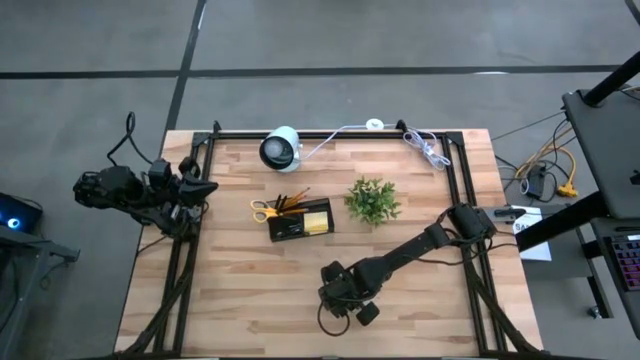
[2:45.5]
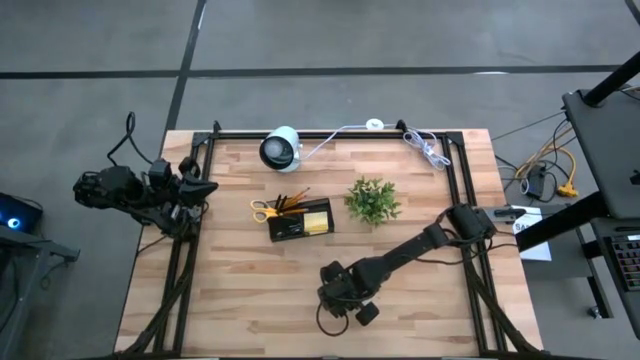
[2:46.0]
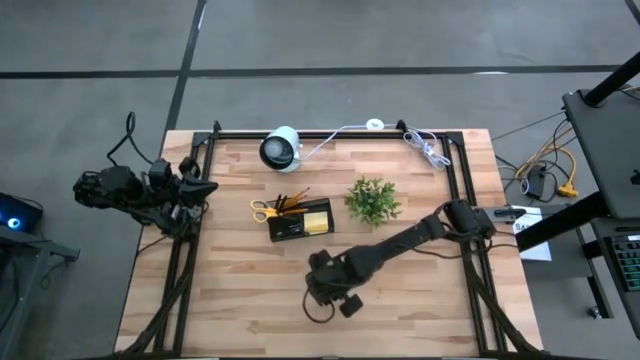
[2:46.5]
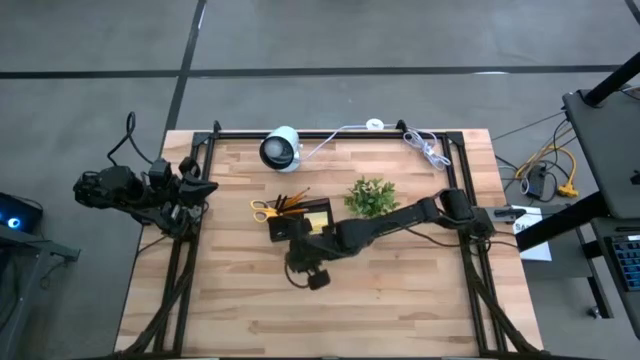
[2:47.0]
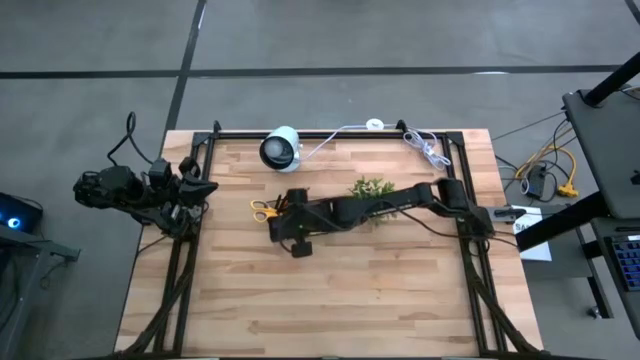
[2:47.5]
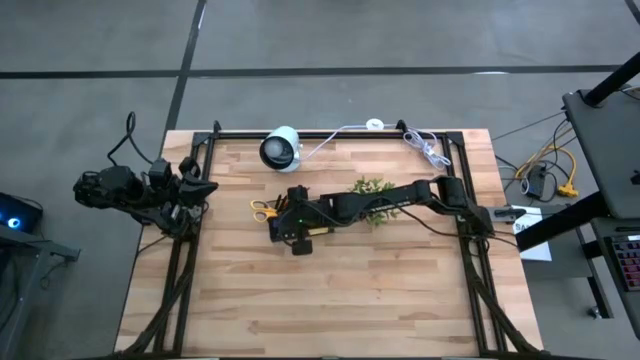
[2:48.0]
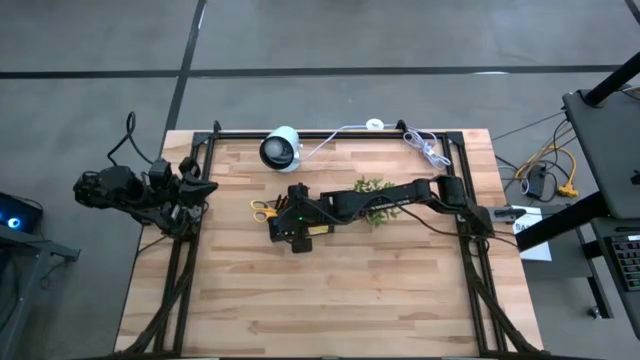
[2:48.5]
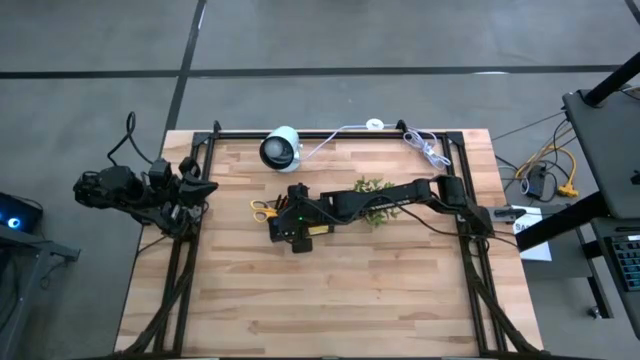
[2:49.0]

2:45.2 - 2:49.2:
Task: Pick and place office supplies into organizer
Put the blue eraser in the black desk organizer

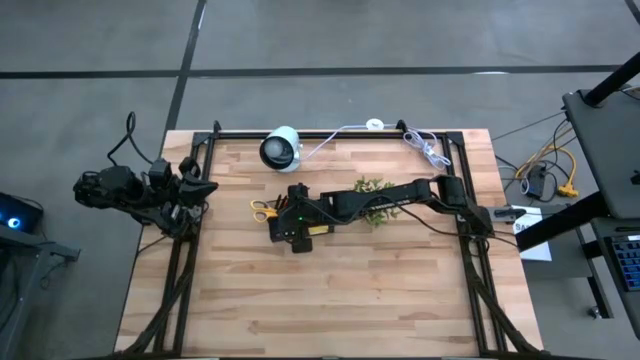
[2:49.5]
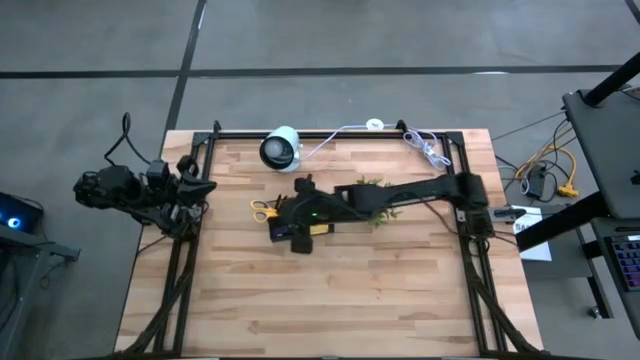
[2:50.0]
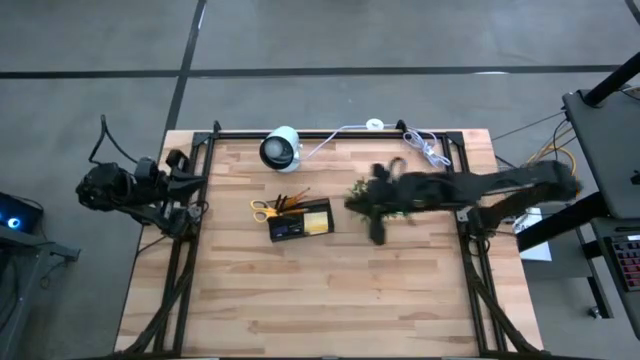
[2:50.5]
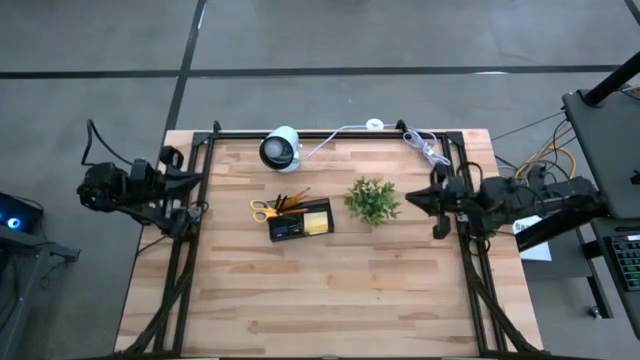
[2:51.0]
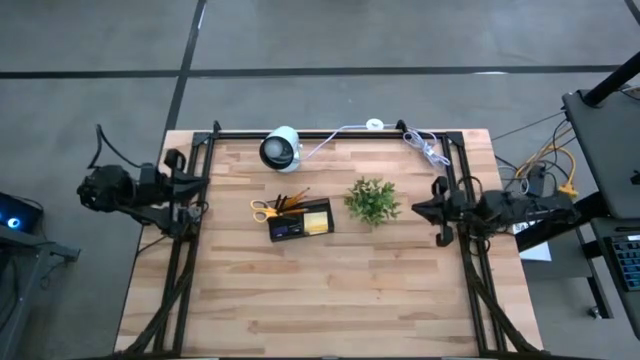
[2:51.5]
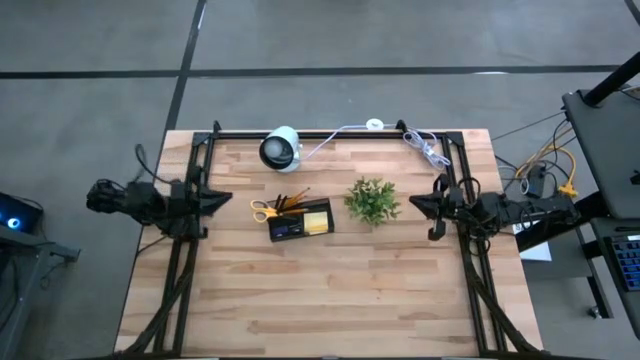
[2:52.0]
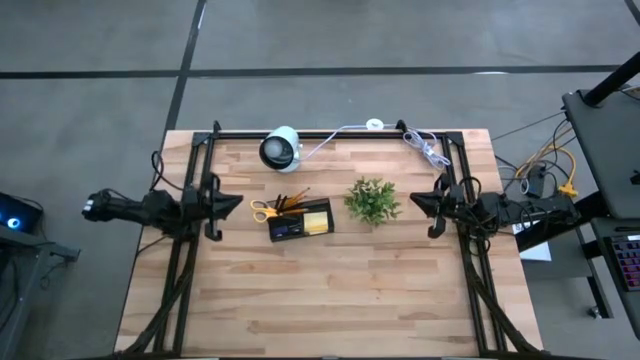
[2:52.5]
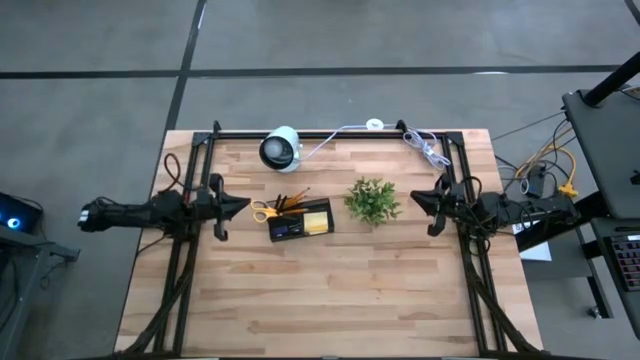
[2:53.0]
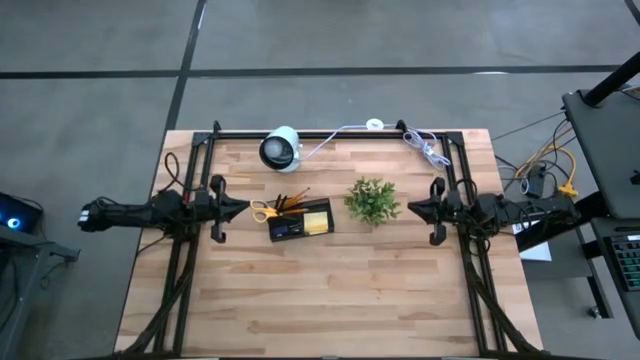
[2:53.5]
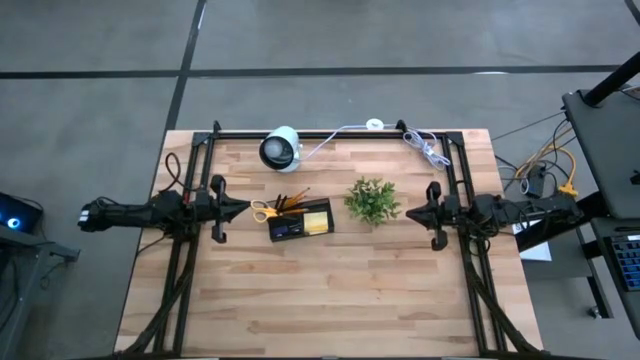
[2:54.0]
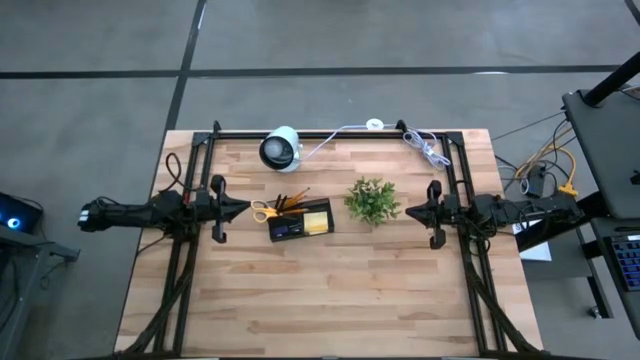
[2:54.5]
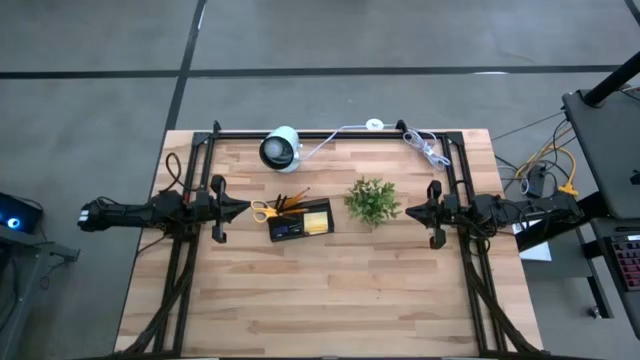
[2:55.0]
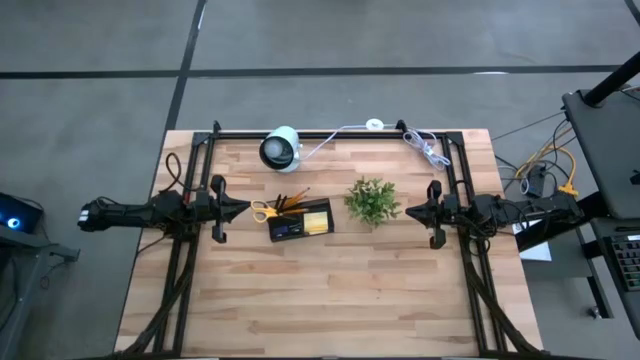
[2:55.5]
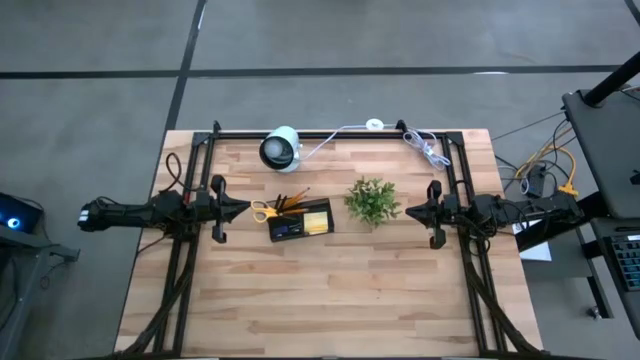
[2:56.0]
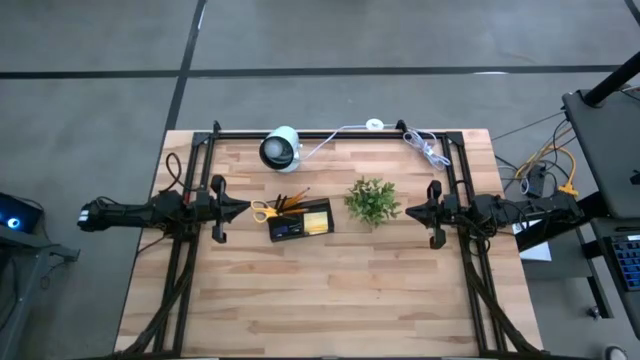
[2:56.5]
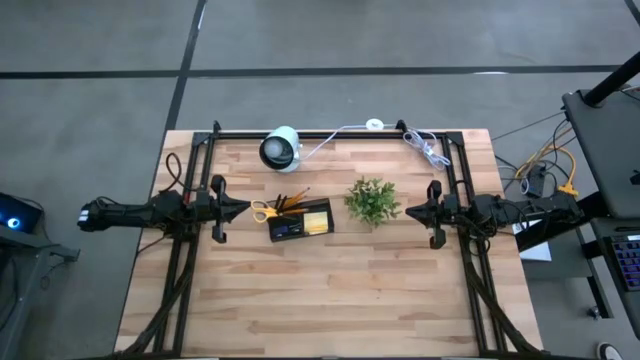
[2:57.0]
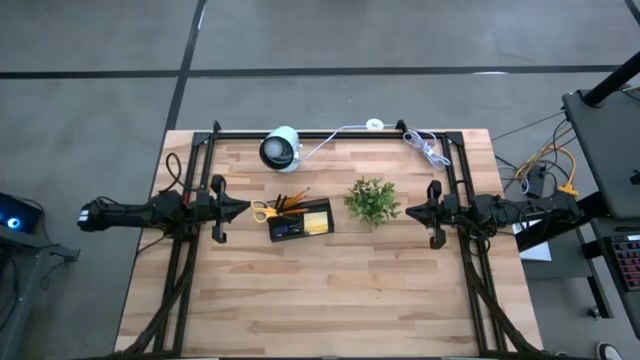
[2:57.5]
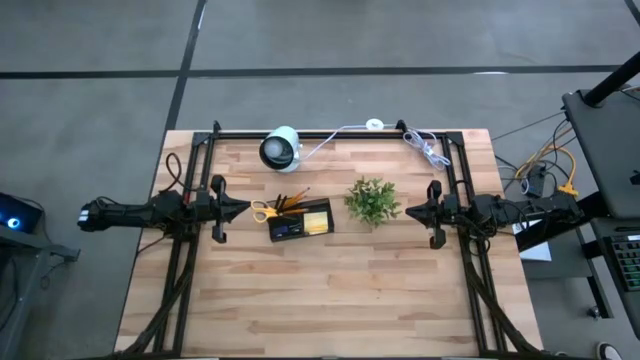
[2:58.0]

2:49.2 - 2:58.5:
Return to Home Position

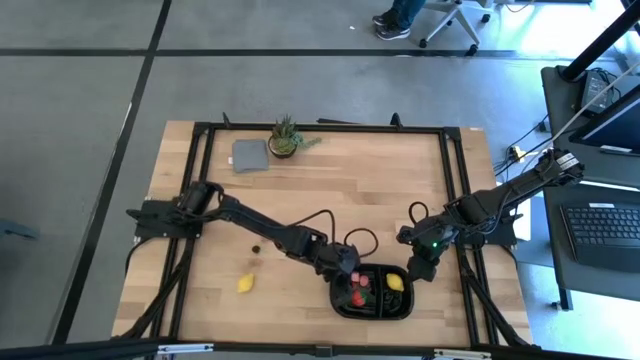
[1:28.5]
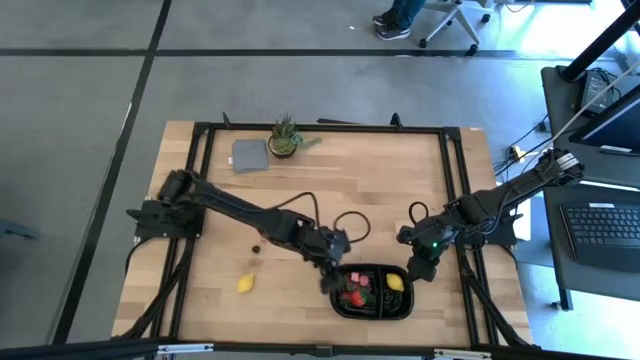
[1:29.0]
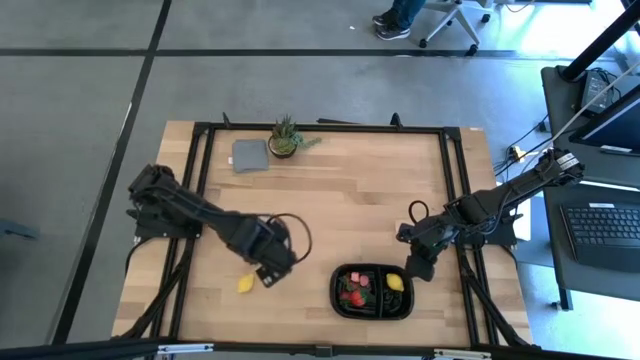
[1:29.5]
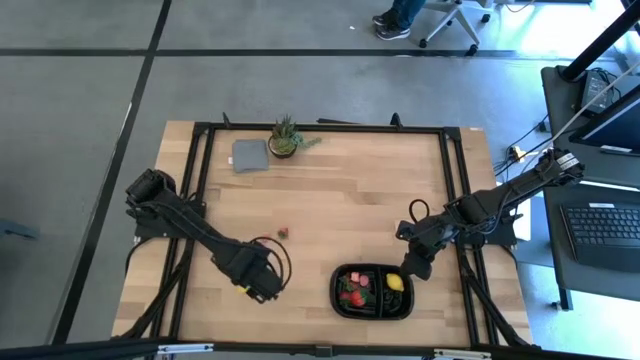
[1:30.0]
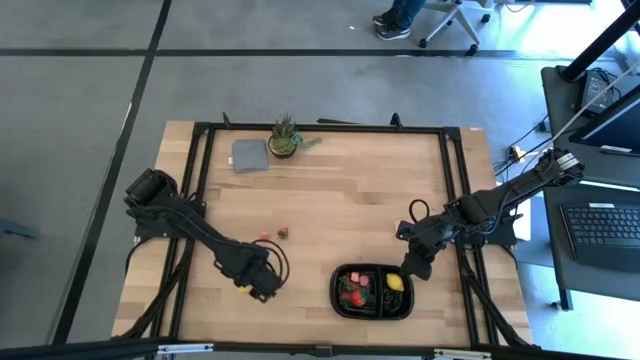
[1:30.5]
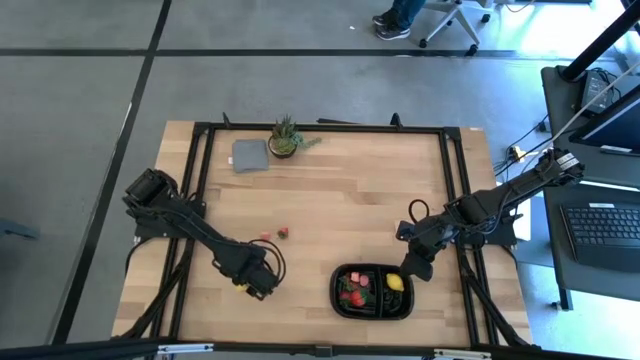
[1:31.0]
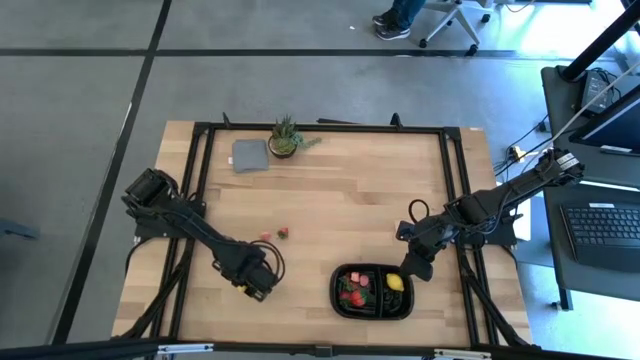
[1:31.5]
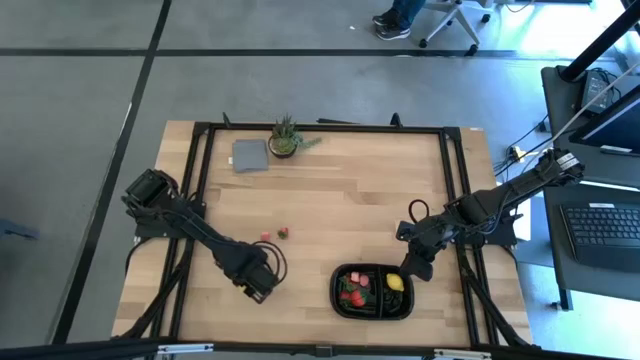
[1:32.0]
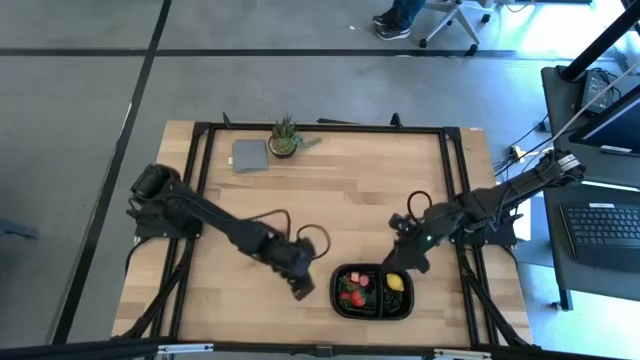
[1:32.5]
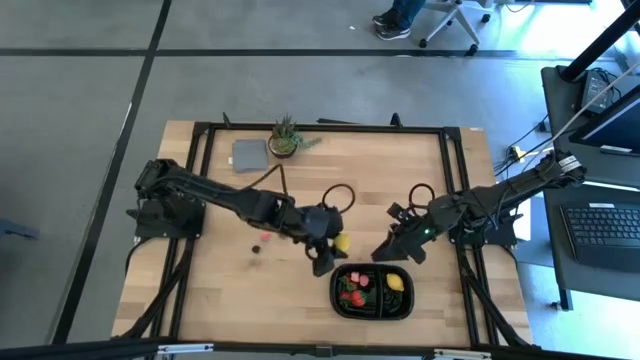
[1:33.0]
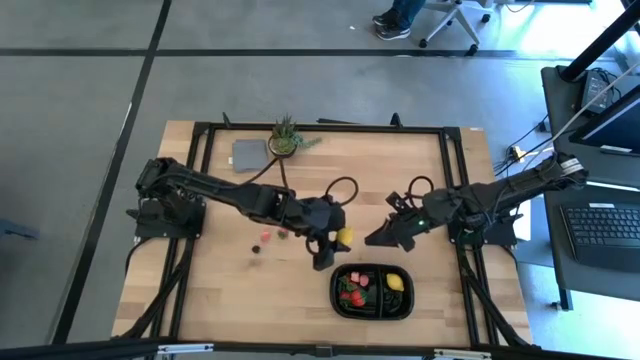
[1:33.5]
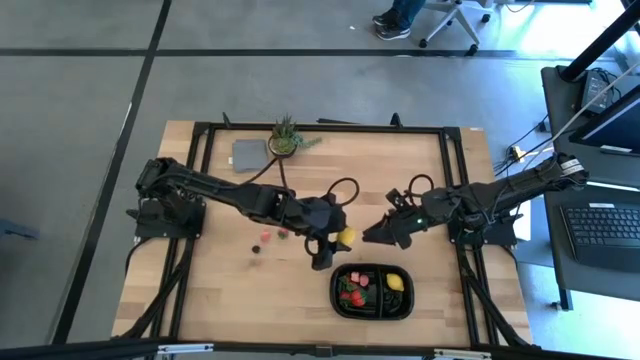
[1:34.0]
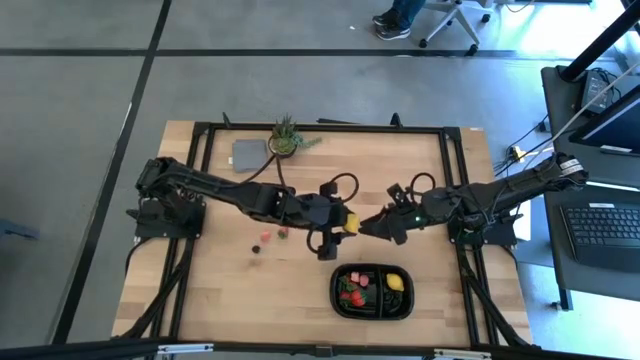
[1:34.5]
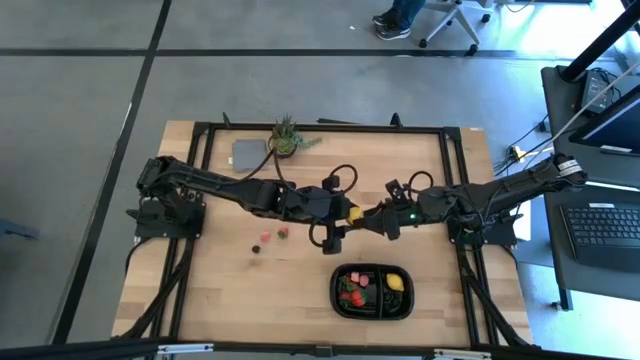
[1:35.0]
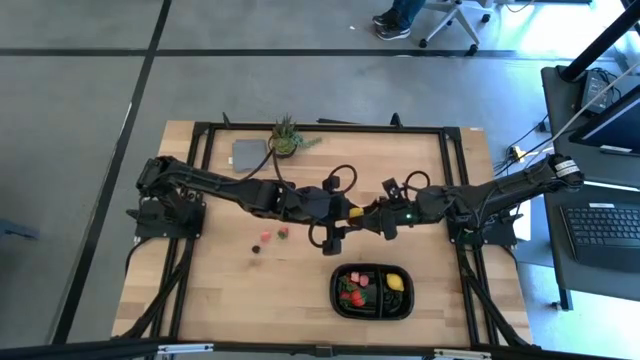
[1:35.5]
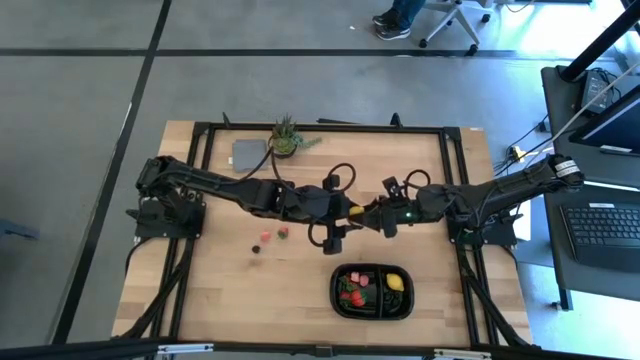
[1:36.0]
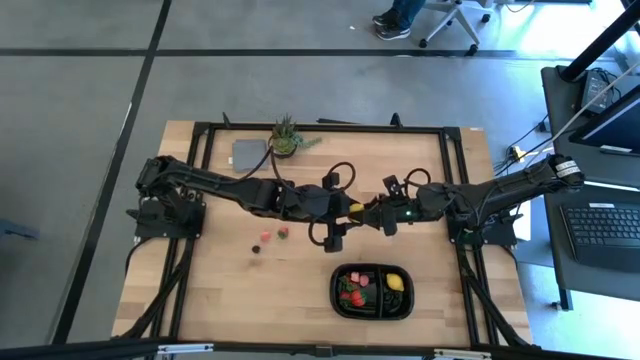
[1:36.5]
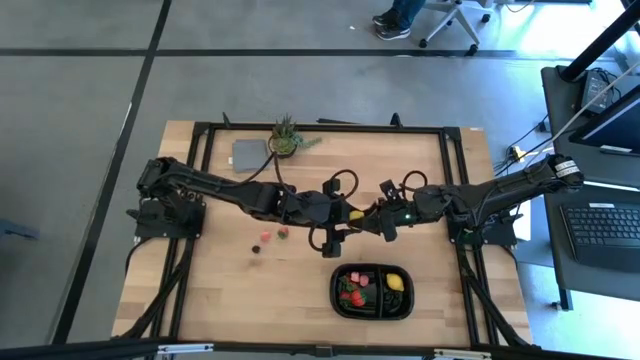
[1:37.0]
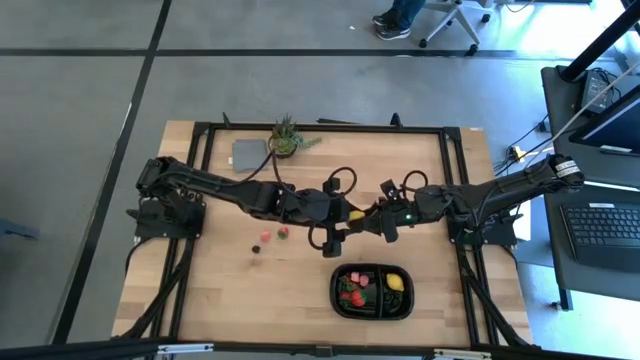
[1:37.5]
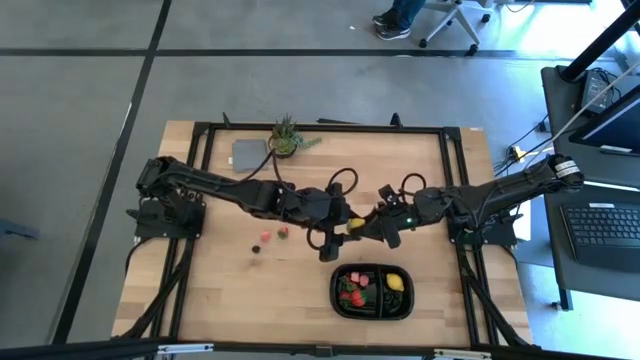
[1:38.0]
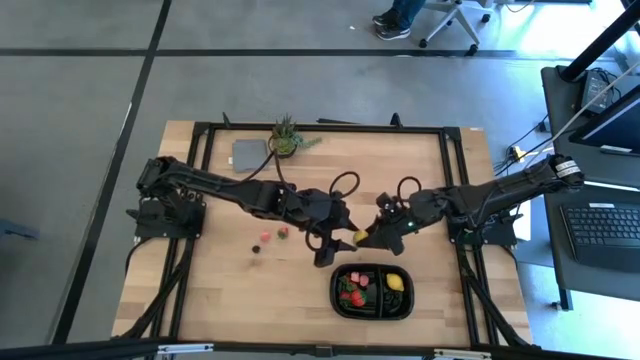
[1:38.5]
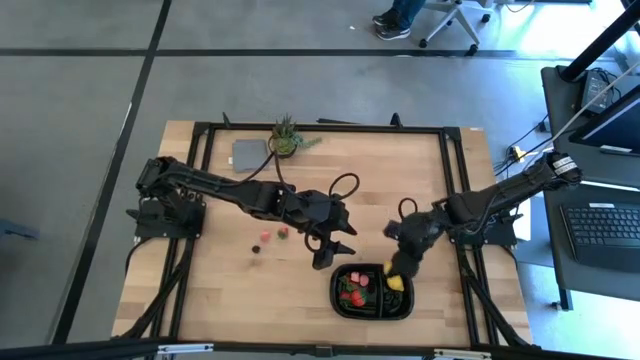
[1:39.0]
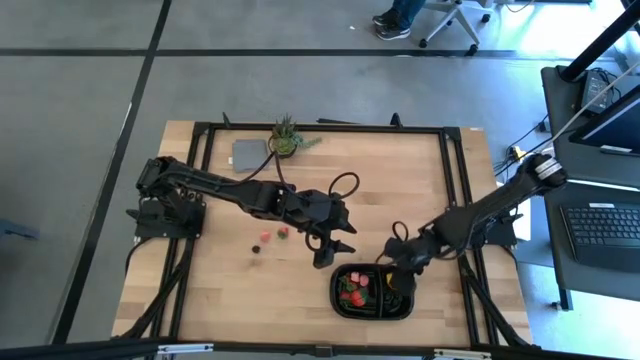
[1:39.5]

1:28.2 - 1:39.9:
Task: Pick and placing Produce into tupperware
Put the yellow lemon into the black bin
